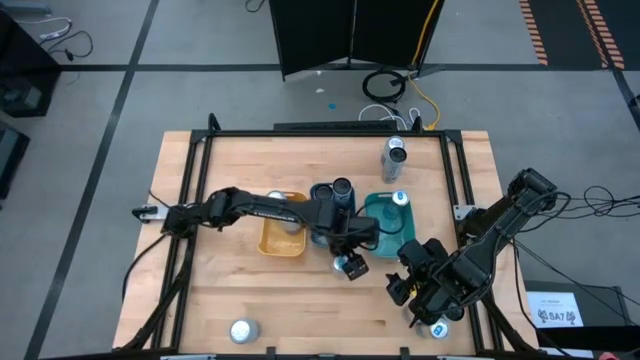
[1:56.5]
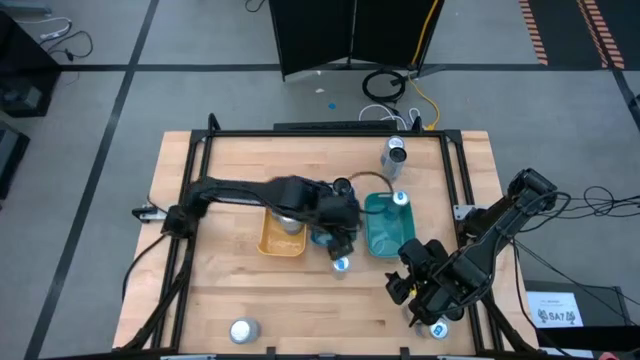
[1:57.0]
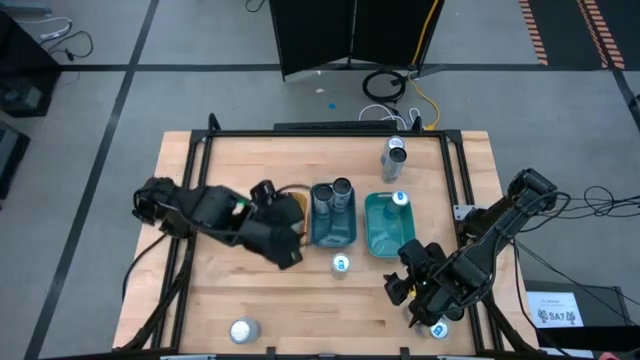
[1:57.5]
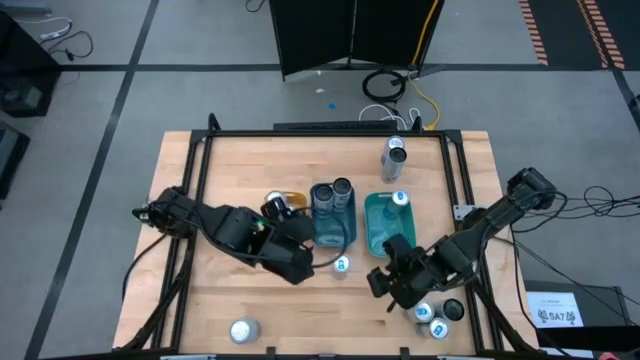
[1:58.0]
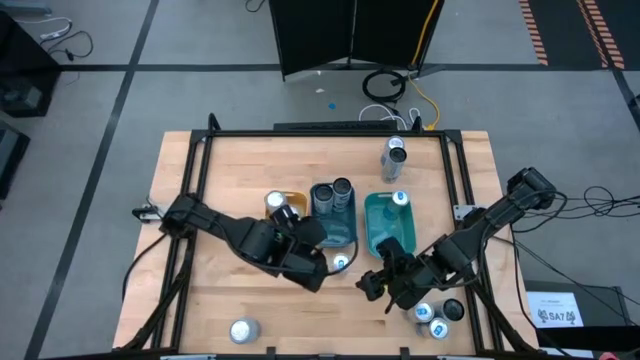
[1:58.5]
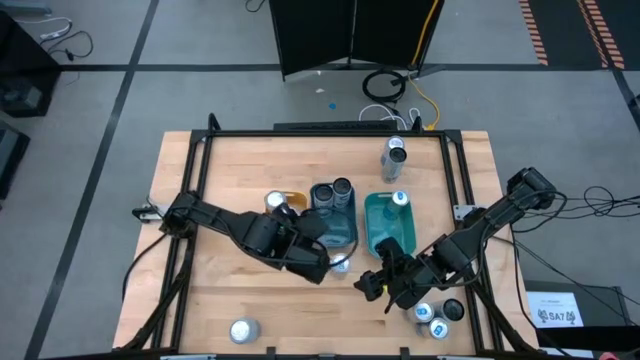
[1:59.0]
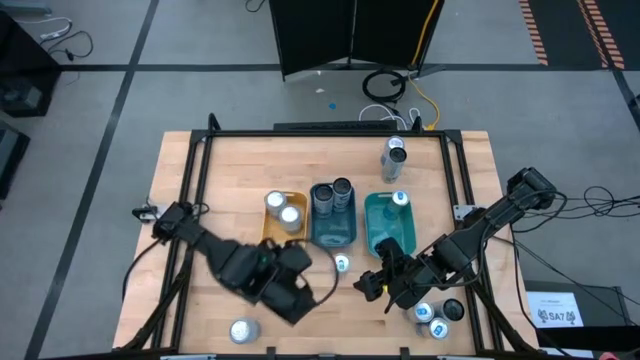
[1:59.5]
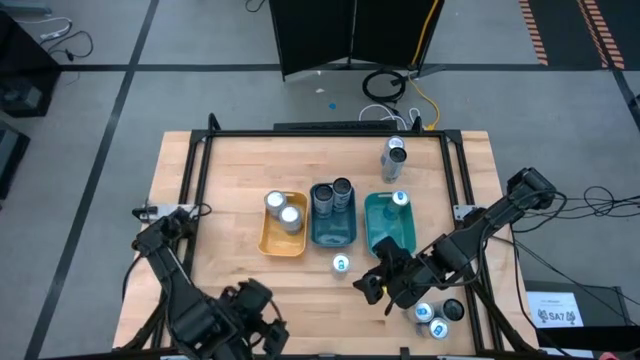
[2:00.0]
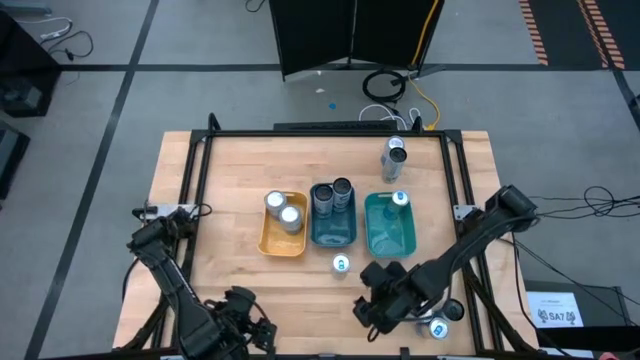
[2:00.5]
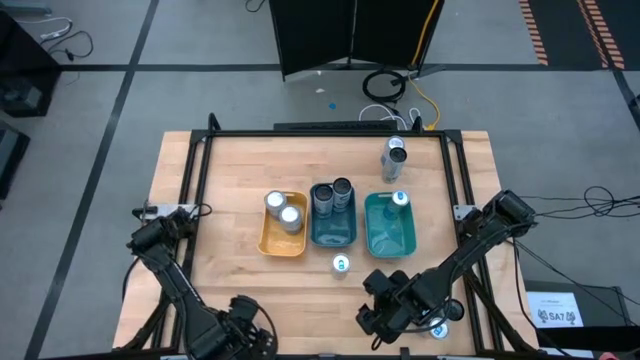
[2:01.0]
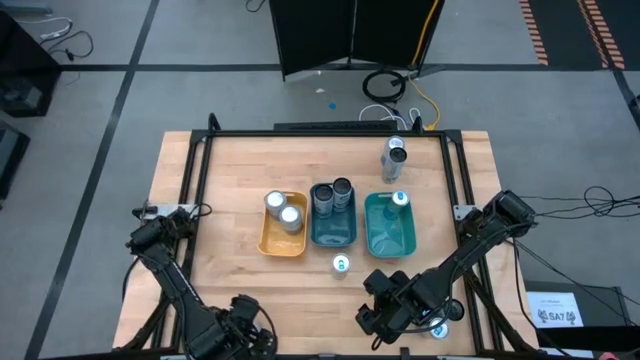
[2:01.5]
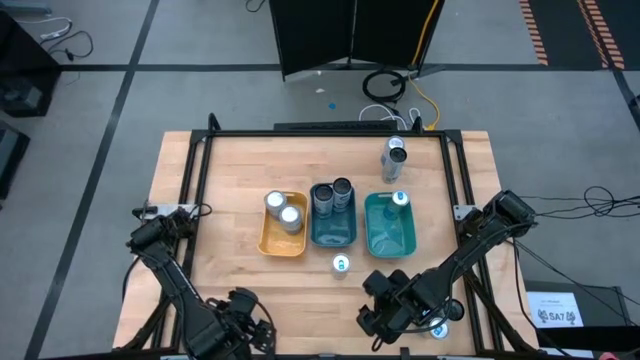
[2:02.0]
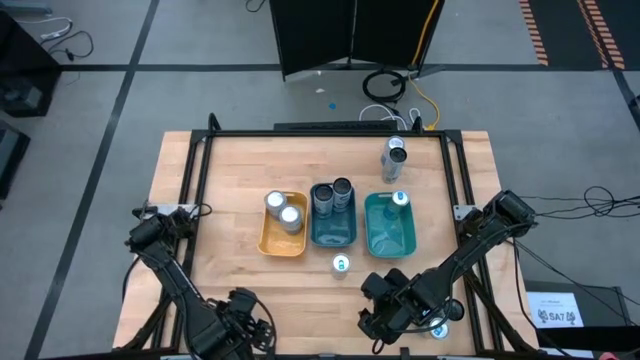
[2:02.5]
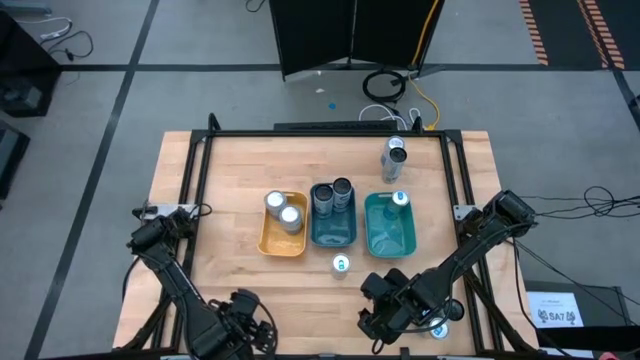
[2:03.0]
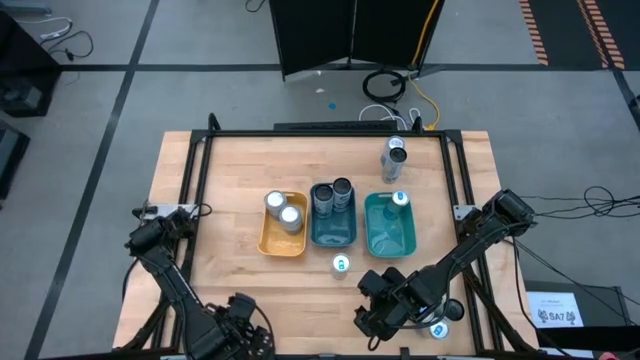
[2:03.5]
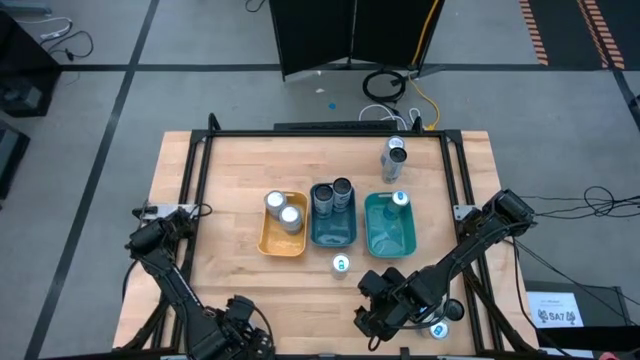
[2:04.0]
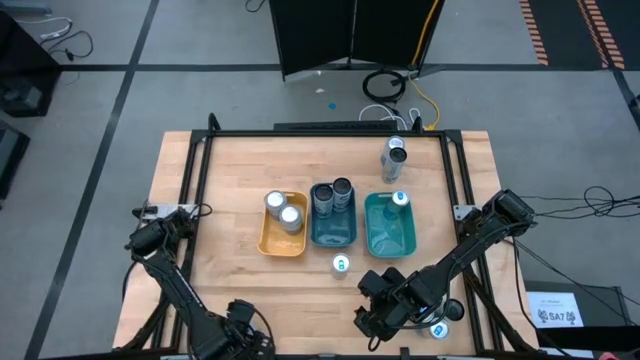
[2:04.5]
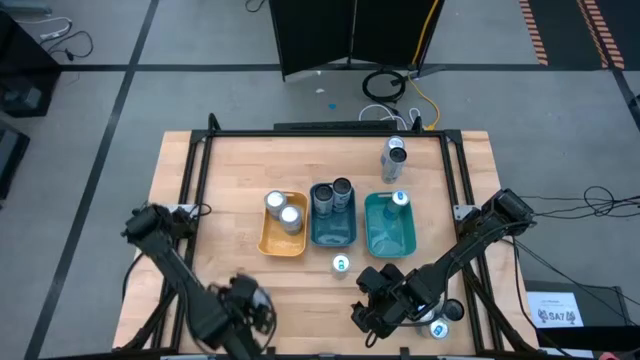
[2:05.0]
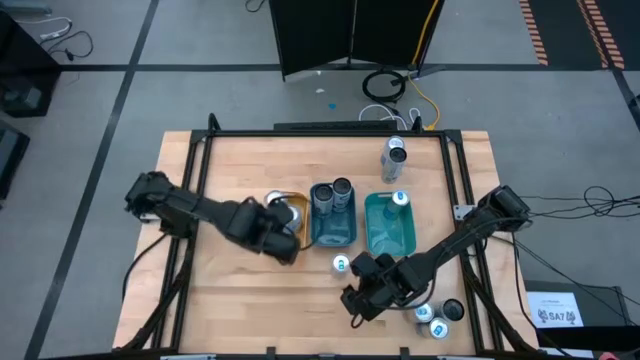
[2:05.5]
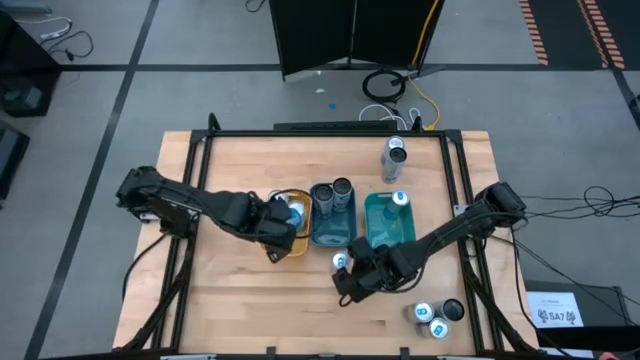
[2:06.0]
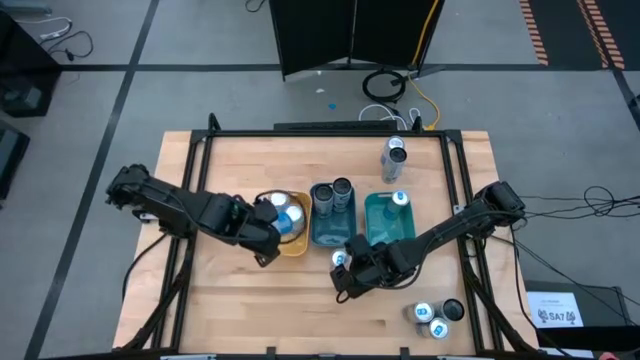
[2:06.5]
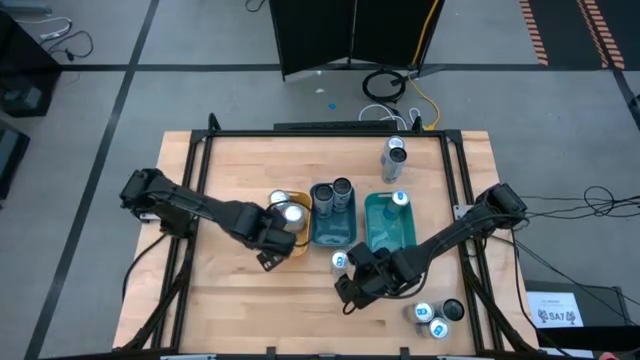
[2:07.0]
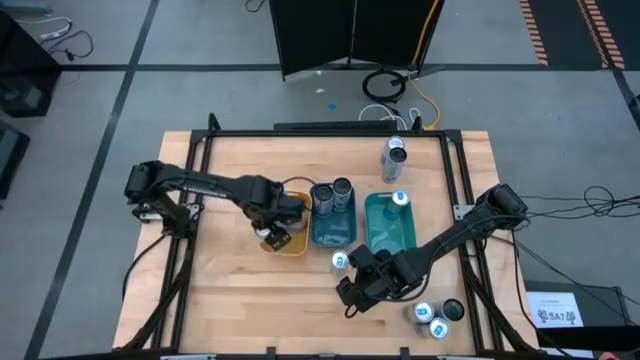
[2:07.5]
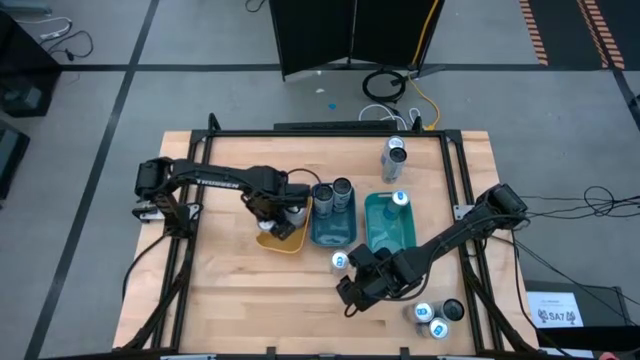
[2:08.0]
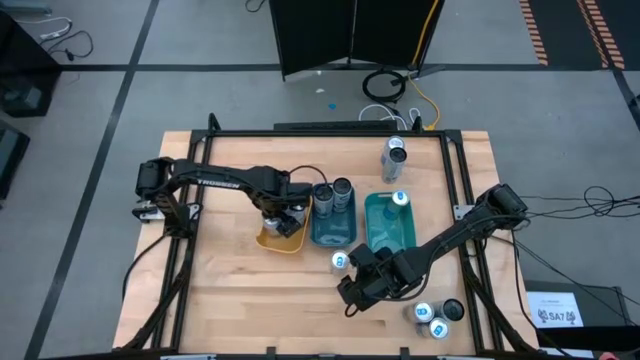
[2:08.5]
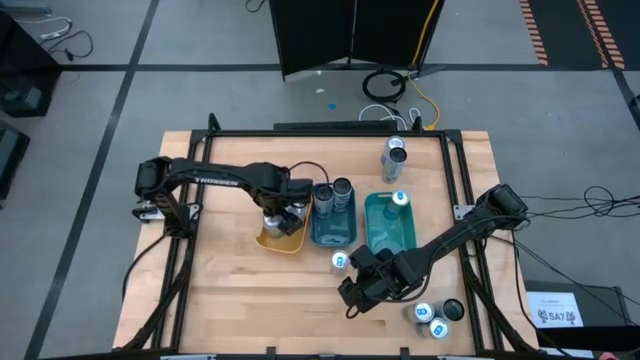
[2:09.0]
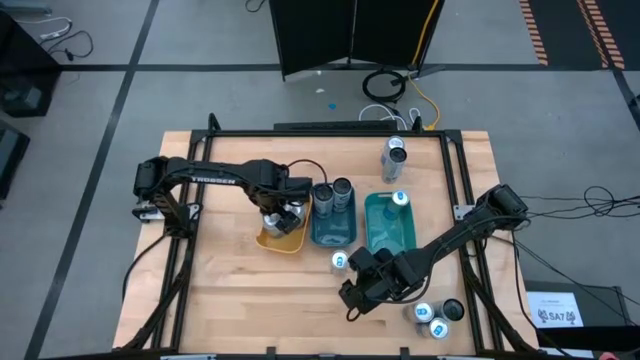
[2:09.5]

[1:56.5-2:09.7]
Task: Sort soda cans
Put the blue-white soda can into the yellow bin

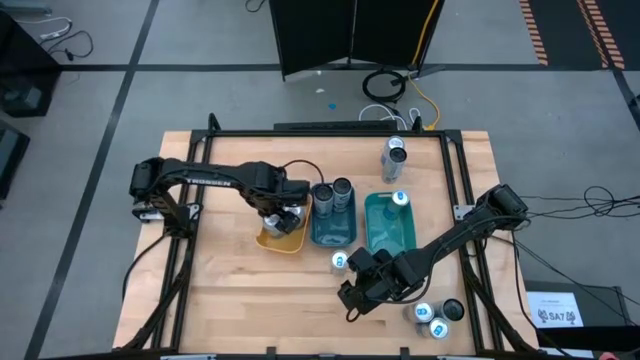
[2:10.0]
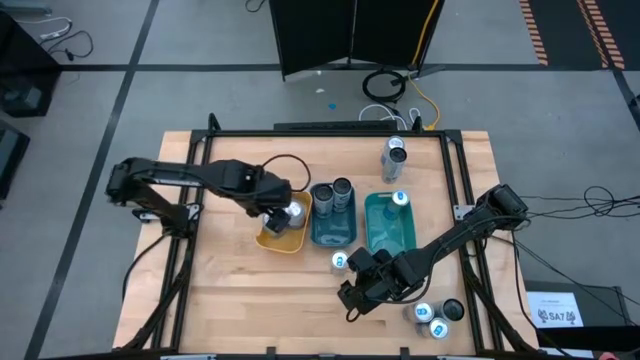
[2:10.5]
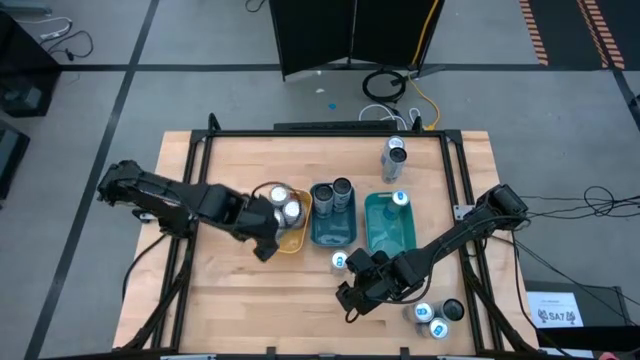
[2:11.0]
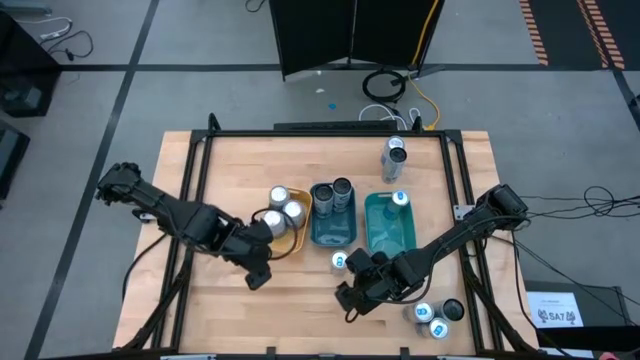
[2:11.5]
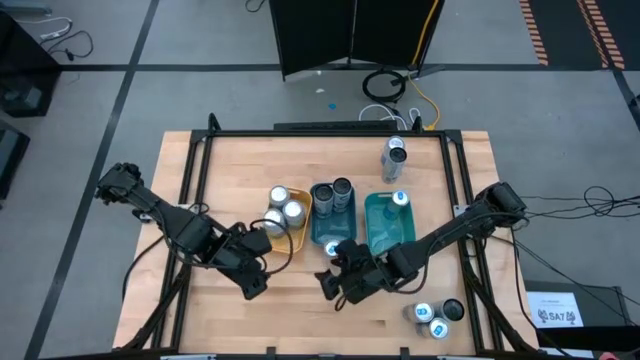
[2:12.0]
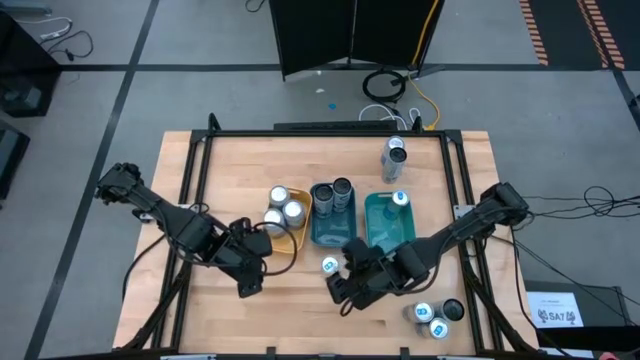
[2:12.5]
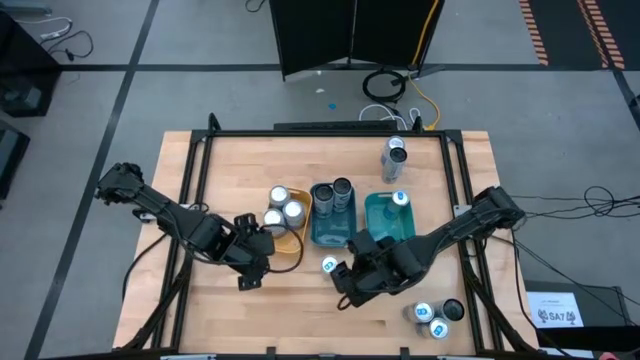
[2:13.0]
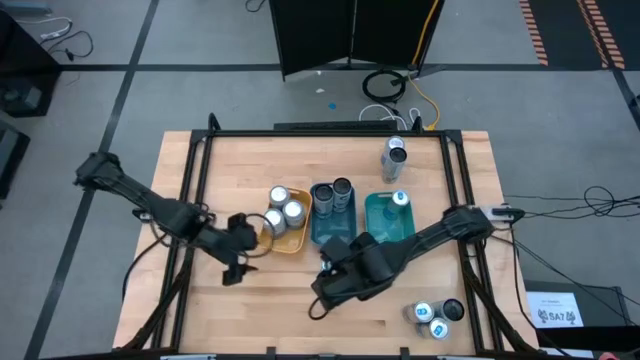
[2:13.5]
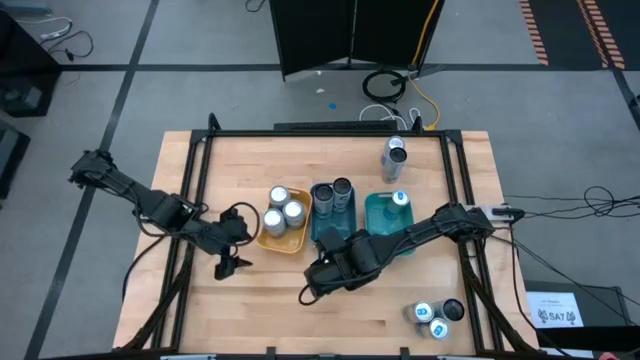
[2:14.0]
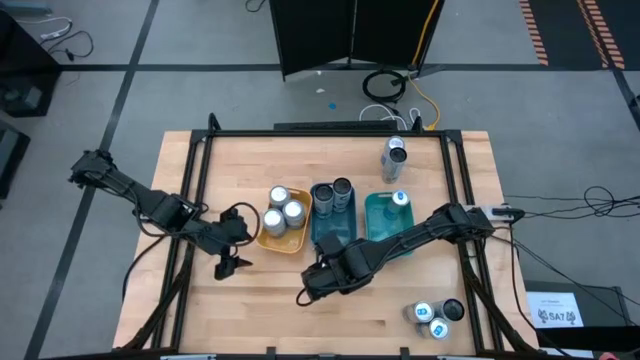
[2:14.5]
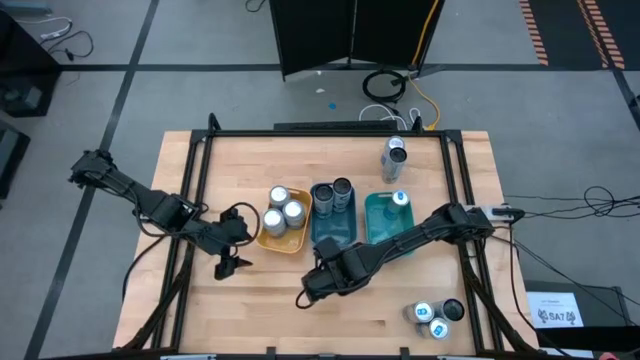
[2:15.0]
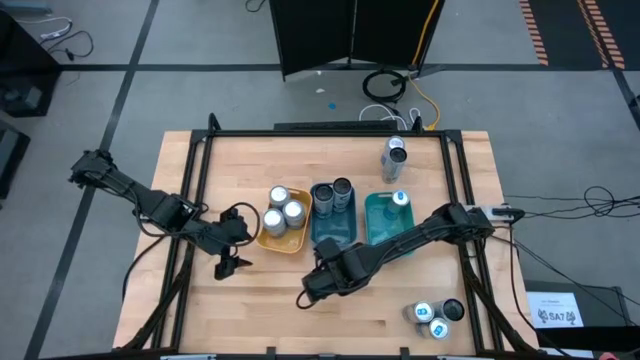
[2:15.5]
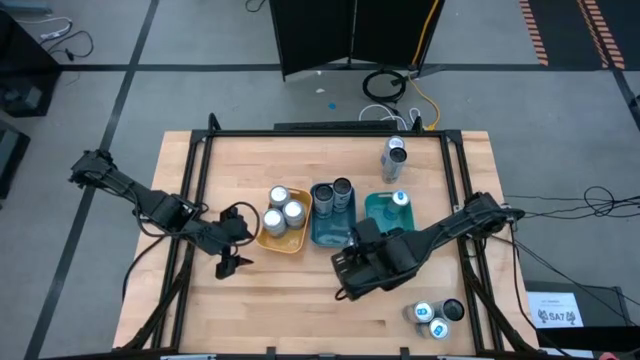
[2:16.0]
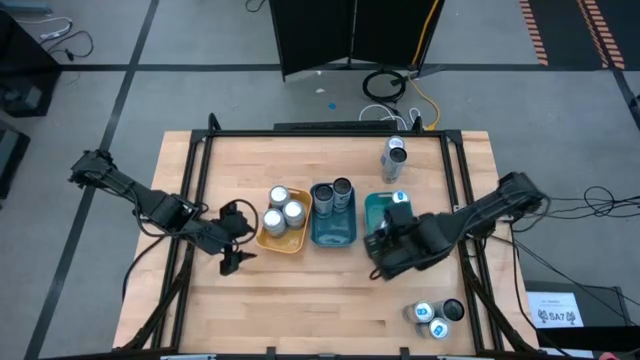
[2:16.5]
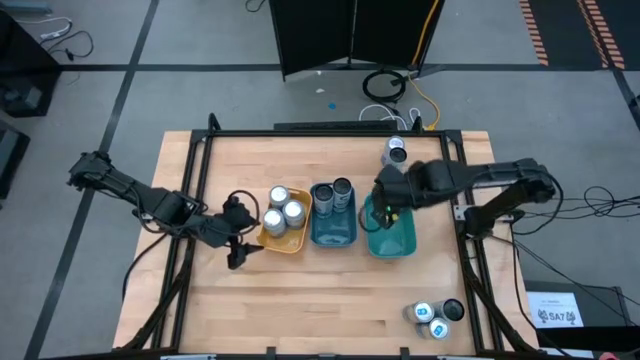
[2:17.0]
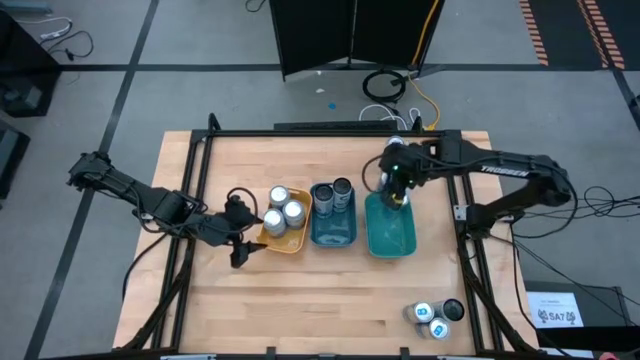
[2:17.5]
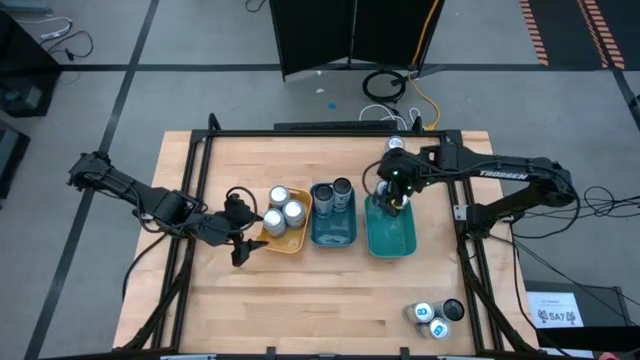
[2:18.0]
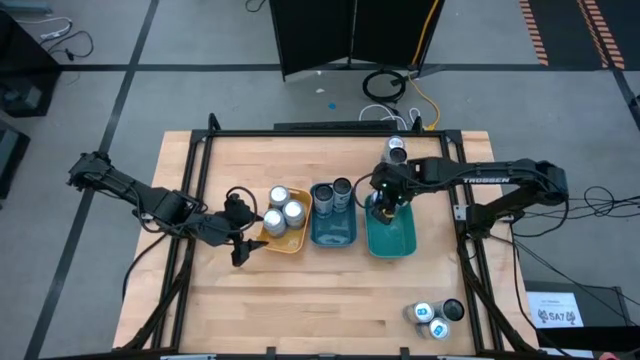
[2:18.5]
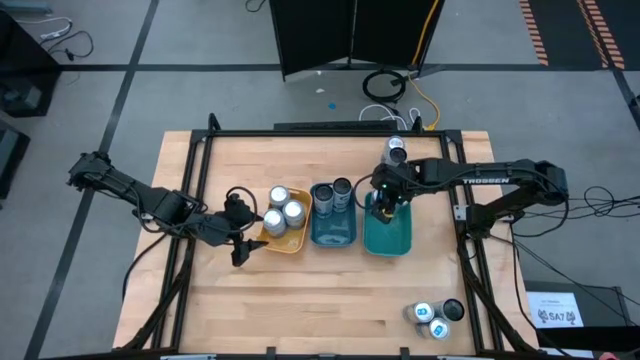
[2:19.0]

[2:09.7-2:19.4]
Put the blue soda can into the green bin
